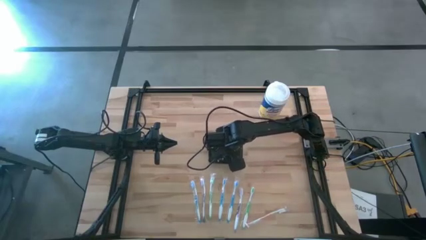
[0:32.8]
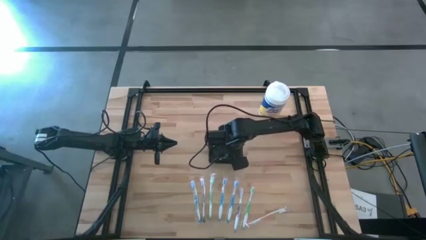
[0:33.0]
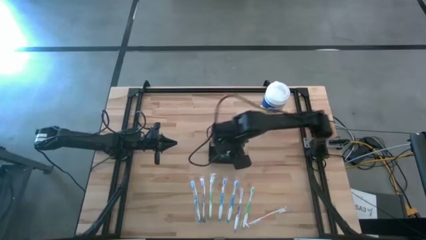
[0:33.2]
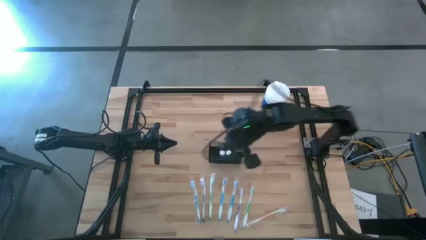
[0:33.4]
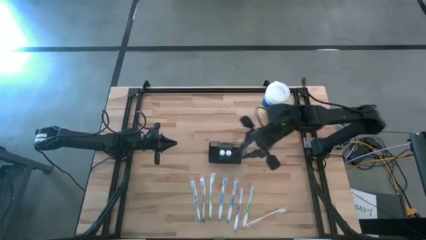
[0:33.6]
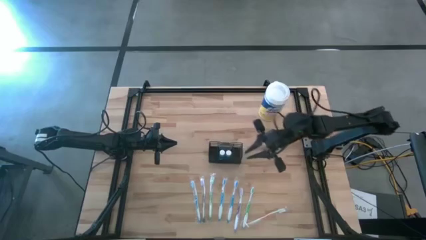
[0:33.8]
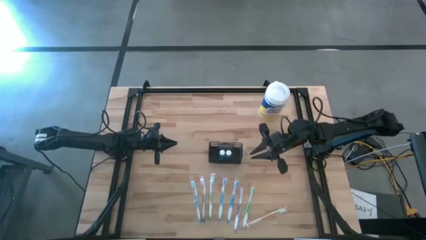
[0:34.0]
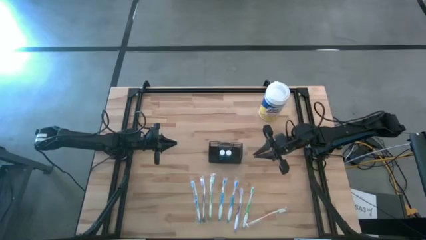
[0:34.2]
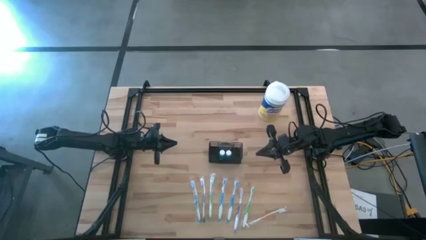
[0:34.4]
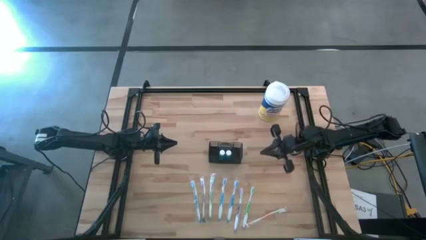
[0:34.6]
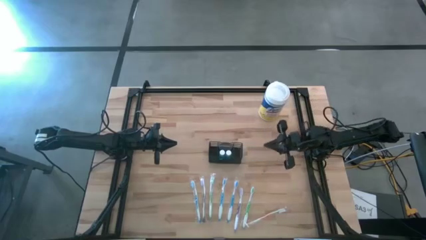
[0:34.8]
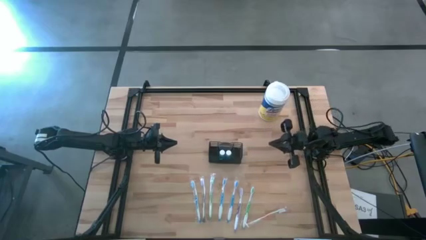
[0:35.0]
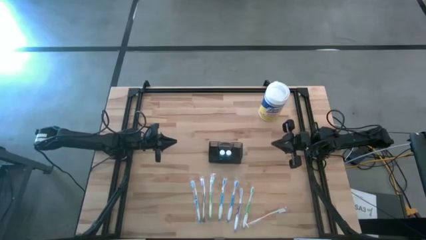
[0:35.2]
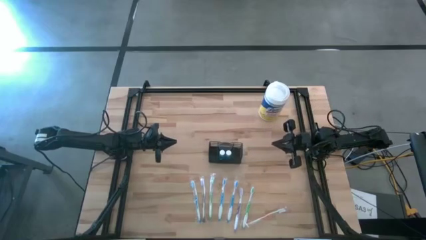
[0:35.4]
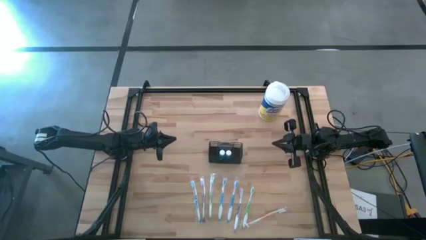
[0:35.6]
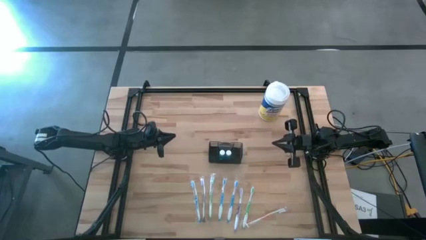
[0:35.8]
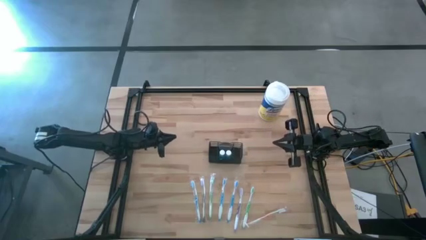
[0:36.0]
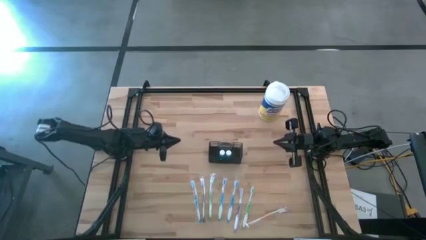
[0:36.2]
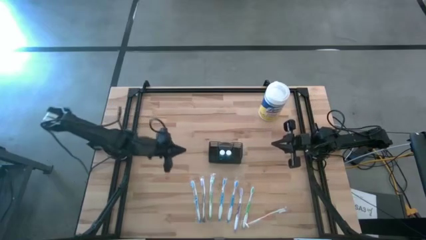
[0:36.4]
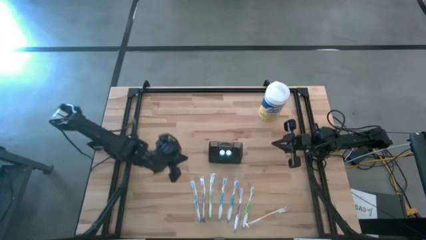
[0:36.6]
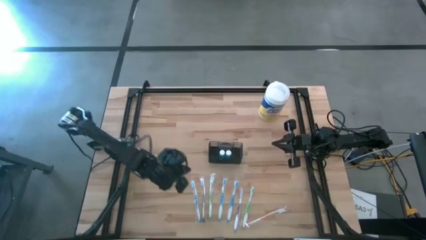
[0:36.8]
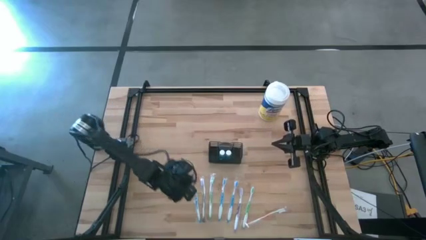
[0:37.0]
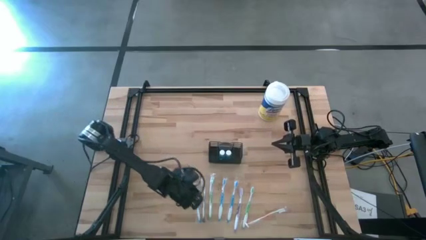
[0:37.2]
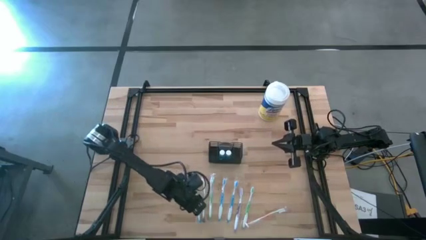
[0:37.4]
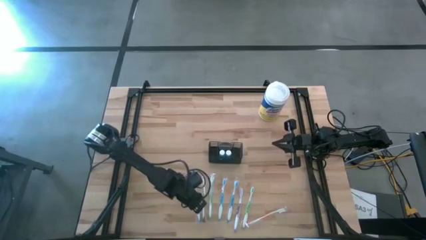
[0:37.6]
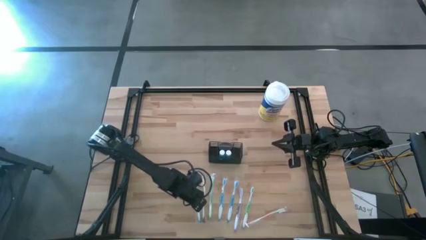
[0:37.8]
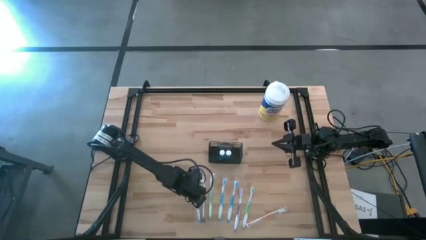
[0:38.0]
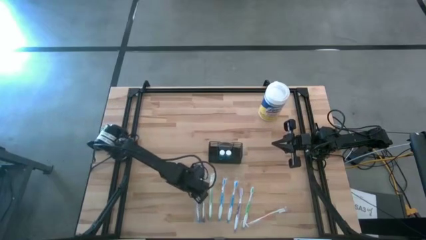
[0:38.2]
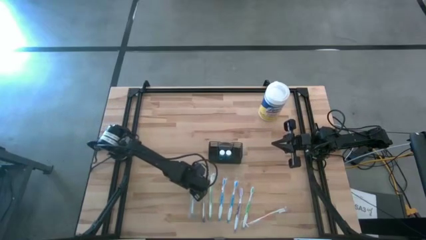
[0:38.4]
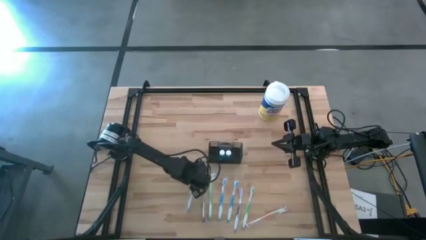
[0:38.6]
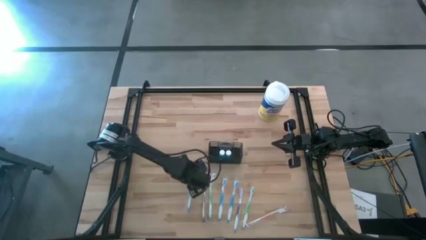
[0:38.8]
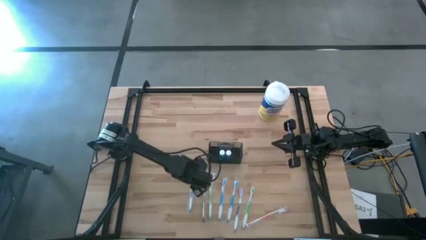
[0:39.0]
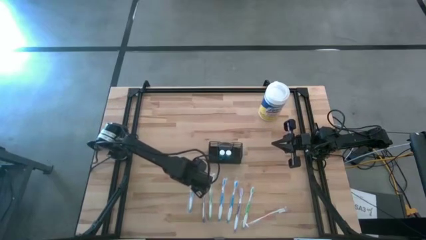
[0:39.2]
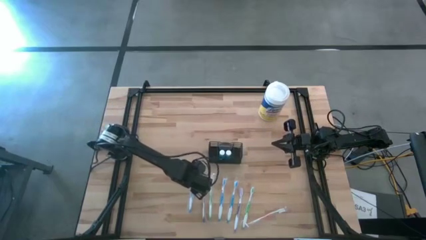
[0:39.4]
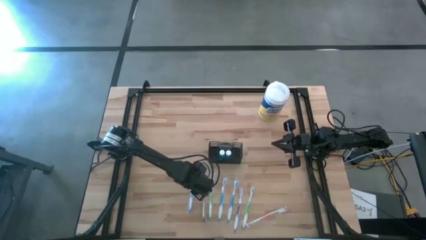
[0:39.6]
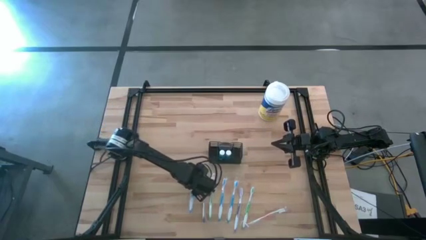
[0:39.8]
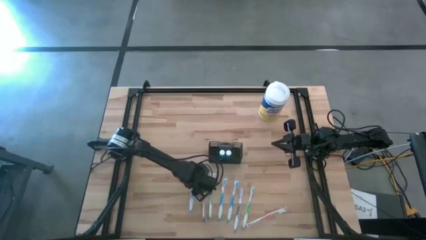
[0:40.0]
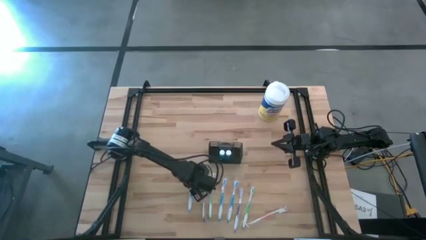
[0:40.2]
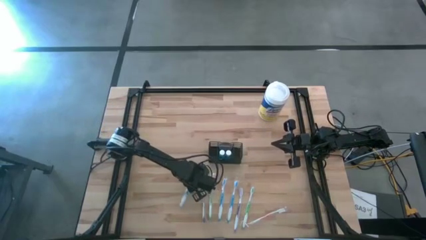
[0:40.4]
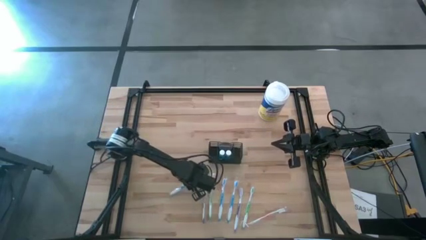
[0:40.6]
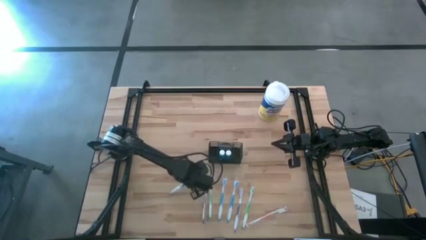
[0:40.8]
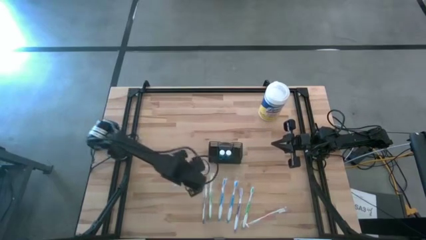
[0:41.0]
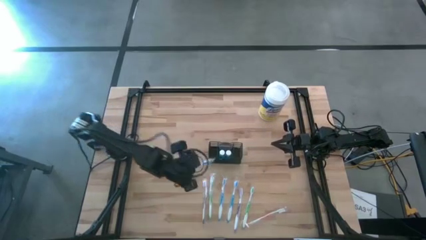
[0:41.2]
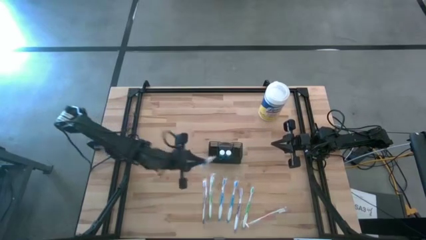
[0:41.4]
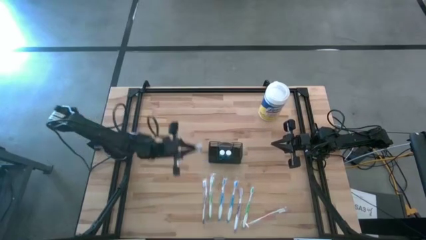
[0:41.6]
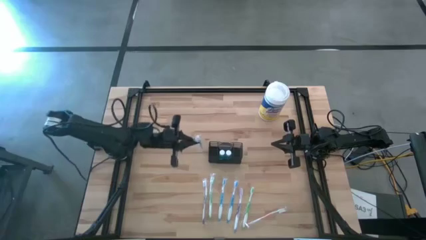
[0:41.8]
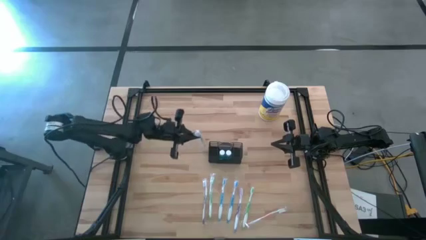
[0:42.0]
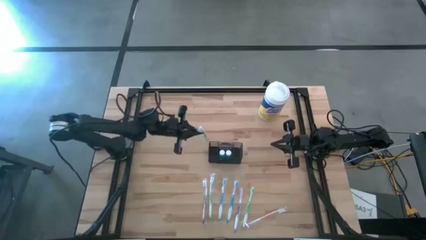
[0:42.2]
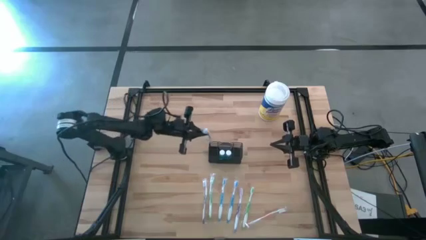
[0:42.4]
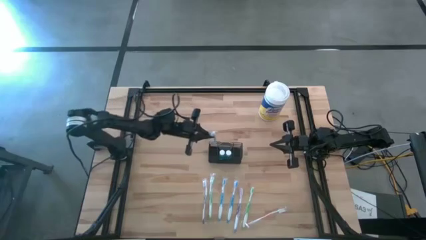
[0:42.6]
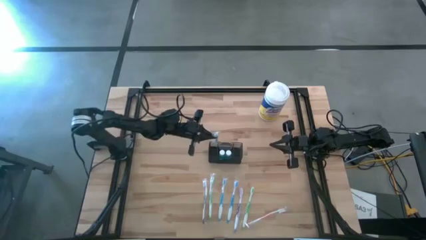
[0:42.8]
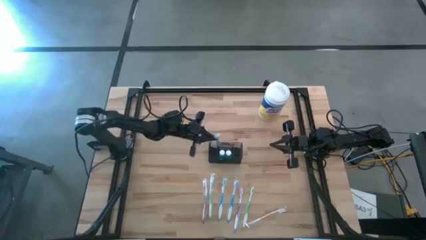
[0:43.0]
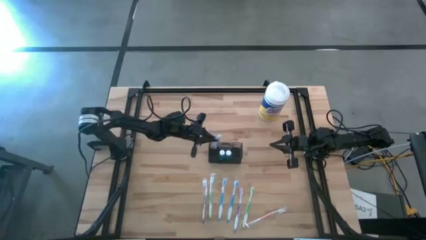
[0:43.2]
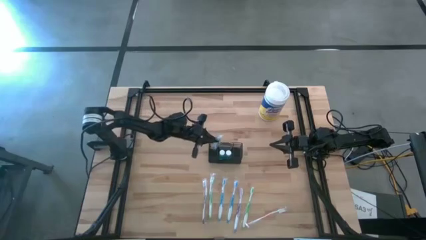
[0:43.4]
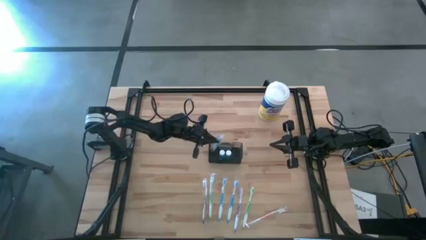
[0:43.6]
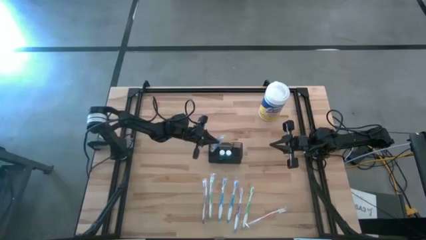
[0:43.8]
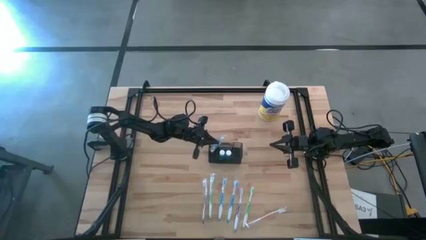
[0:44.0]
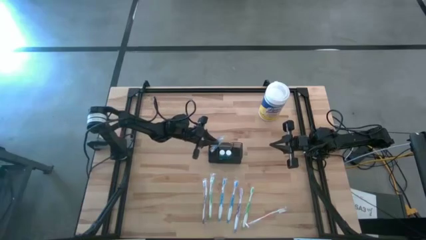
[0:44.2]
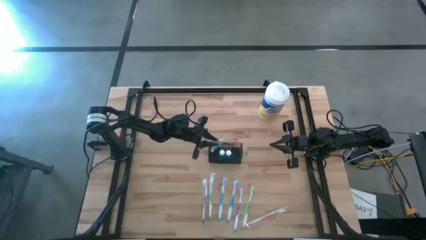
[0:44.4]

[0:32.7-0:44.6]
Task: Pick & Place toothbrushing station
Put the blue toothbrush into the wire organizer
